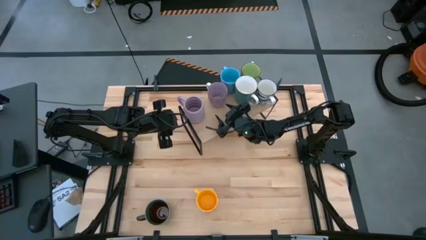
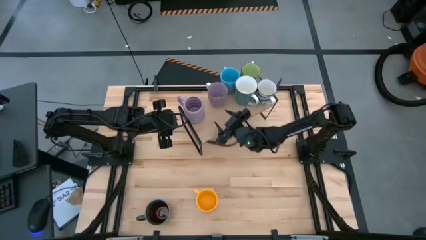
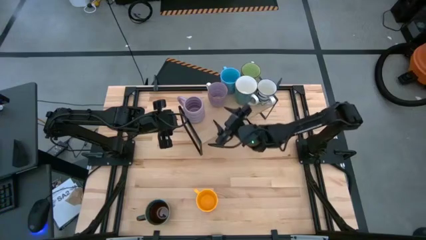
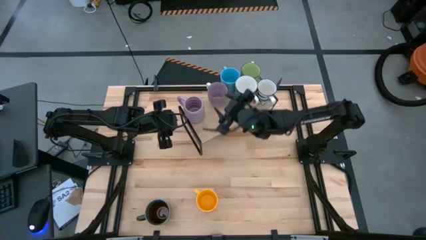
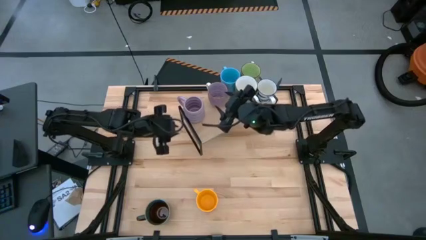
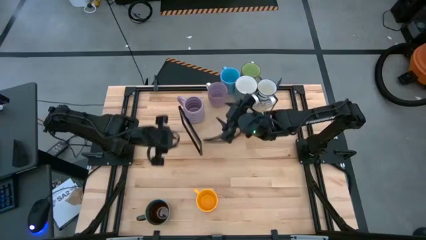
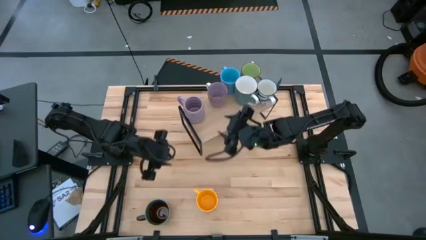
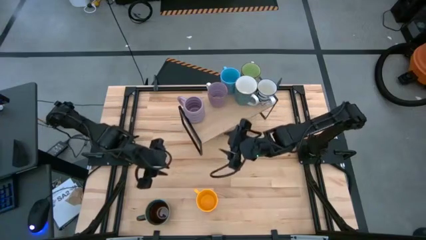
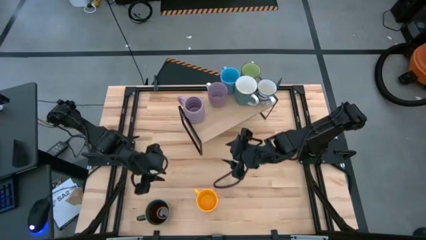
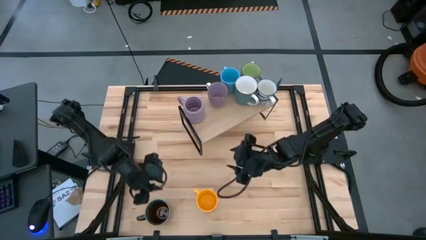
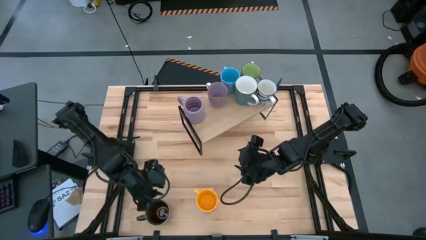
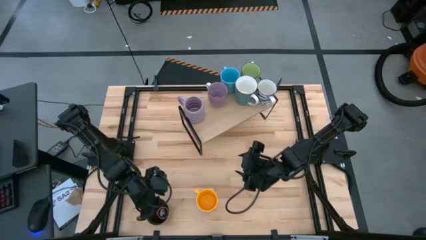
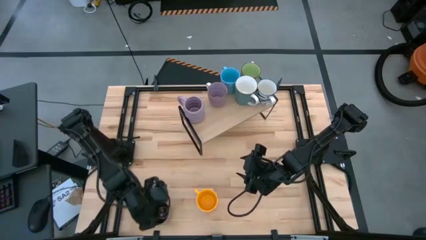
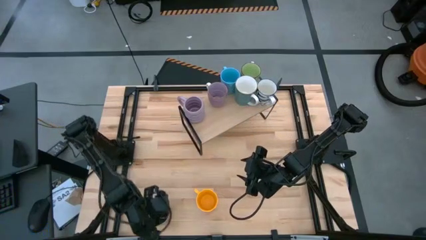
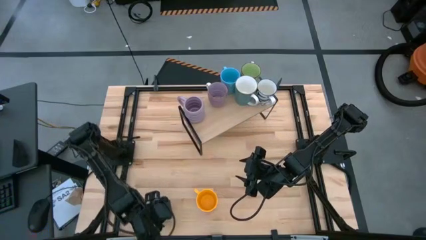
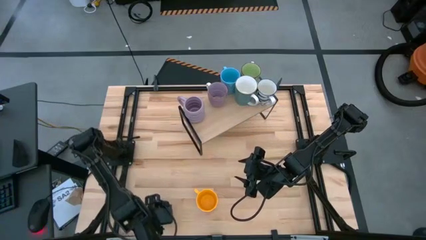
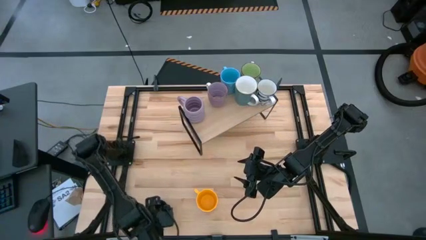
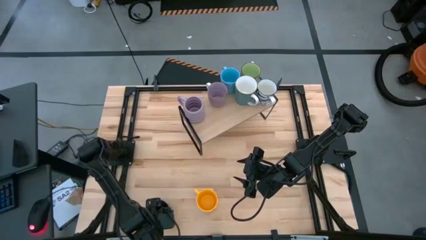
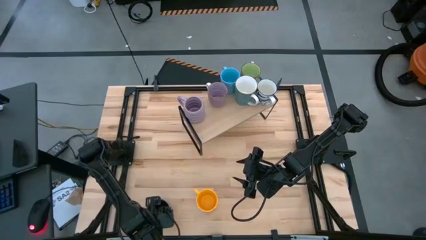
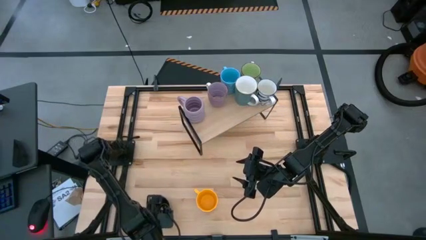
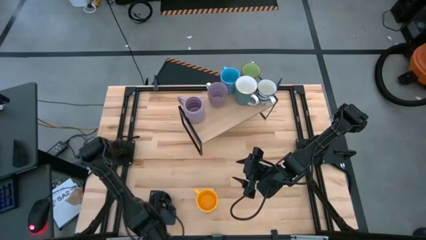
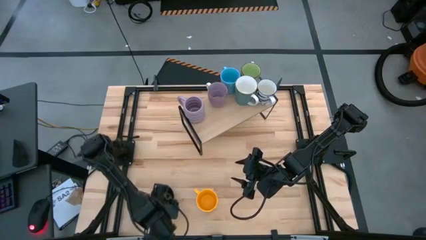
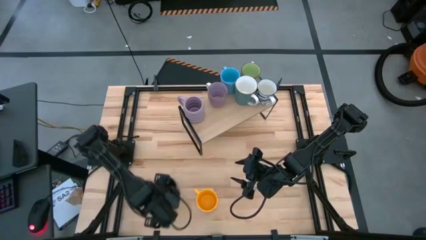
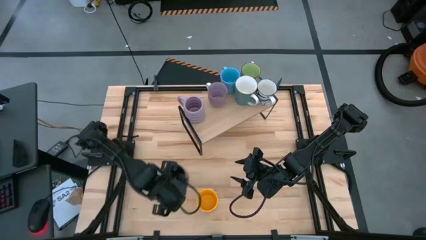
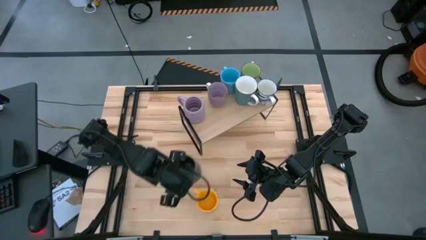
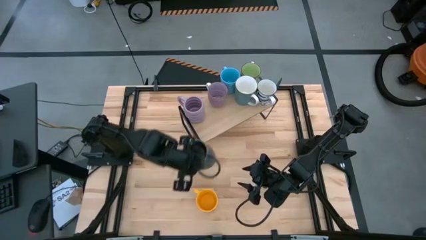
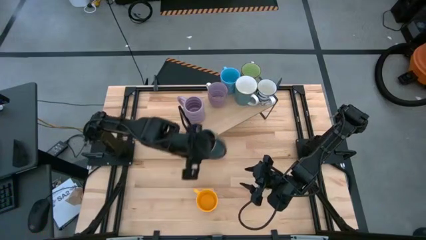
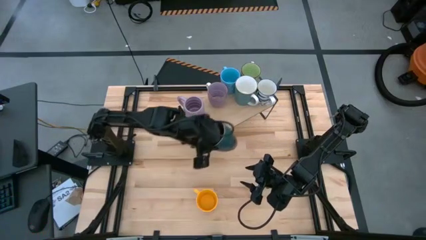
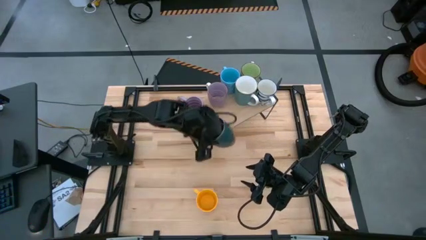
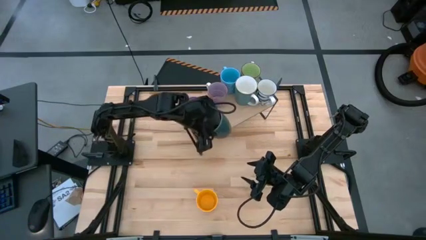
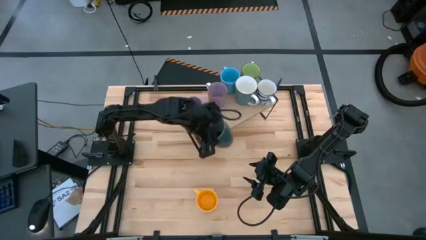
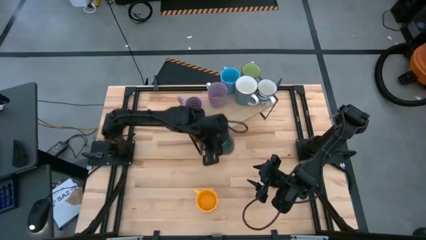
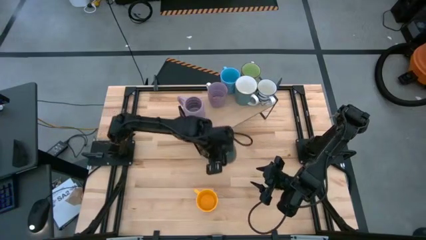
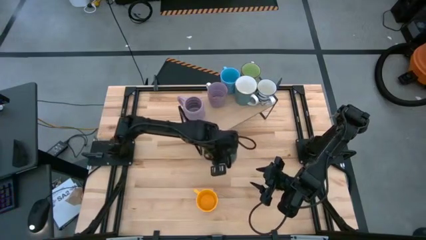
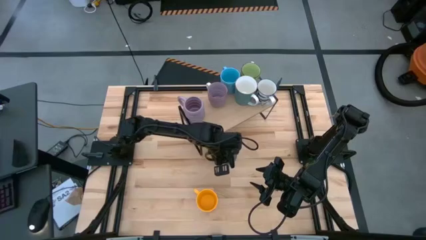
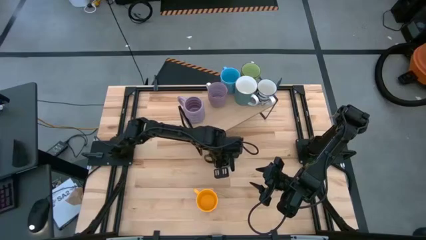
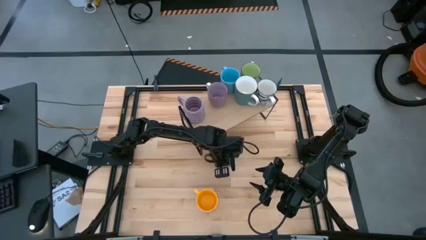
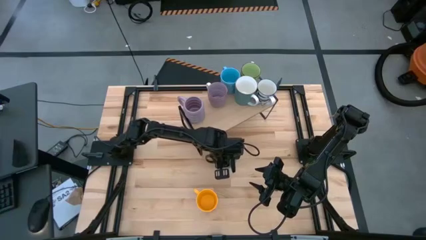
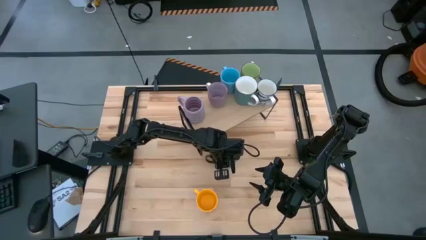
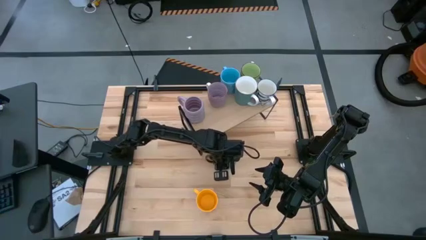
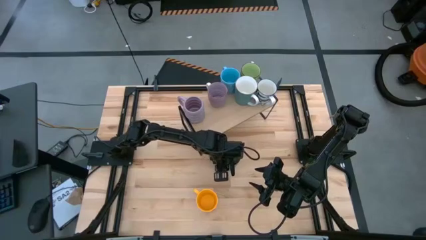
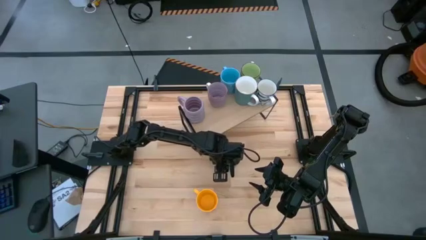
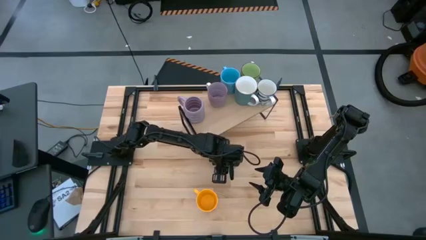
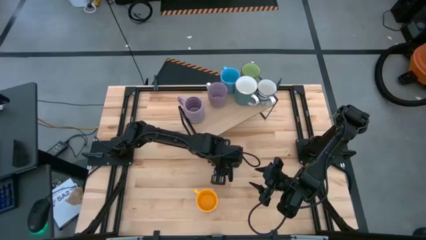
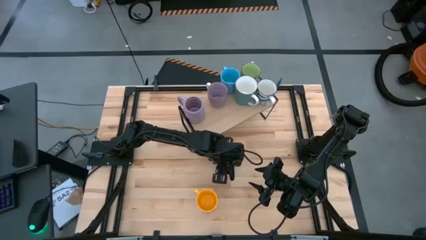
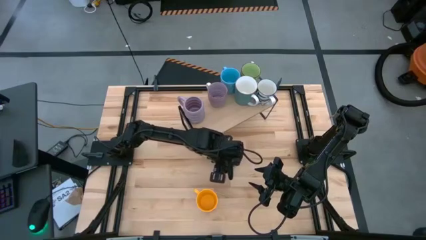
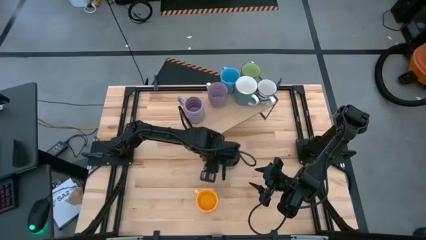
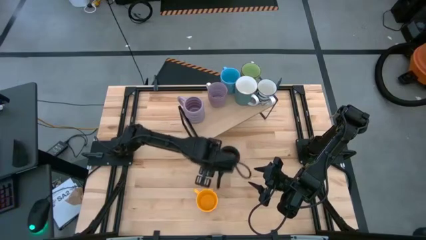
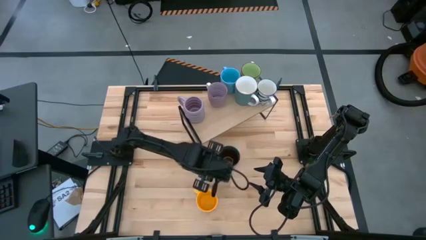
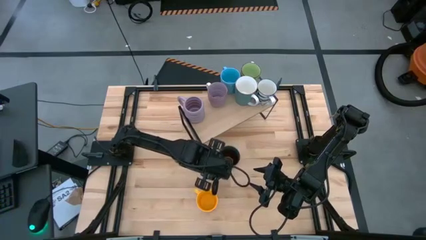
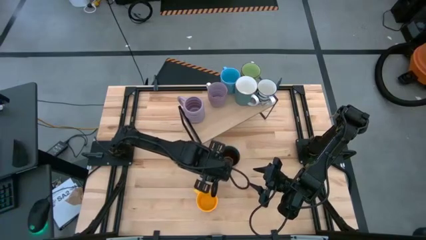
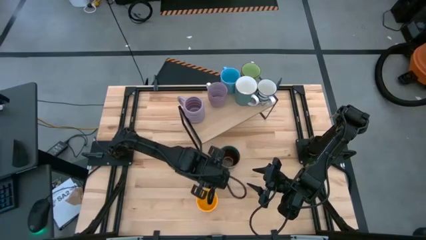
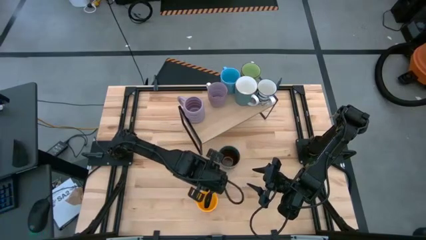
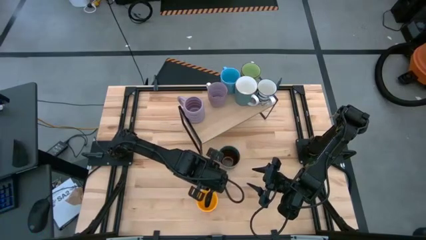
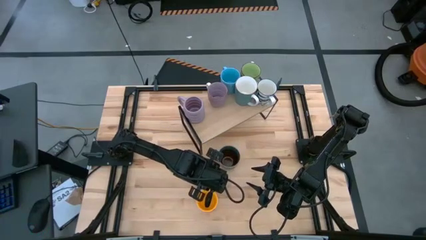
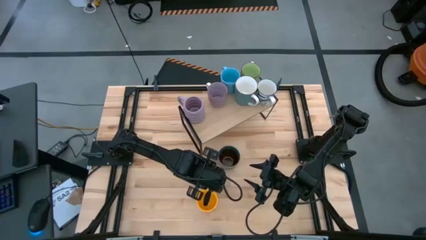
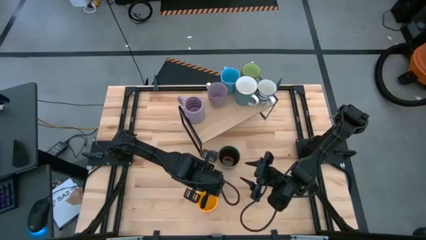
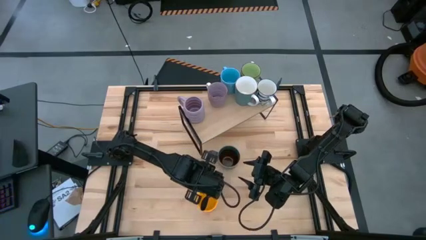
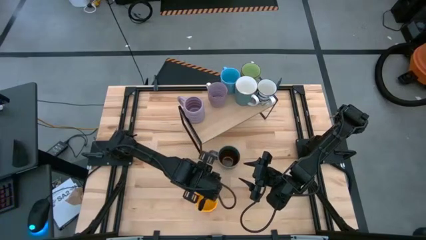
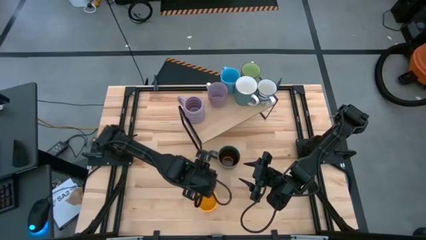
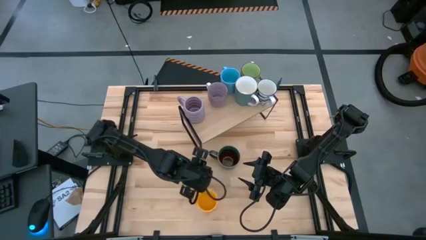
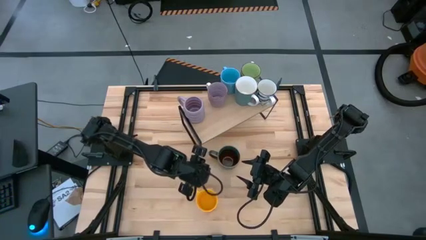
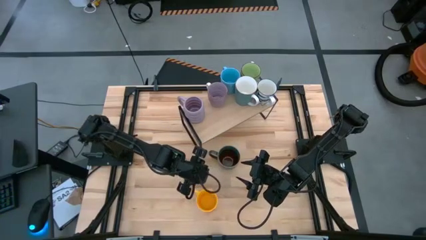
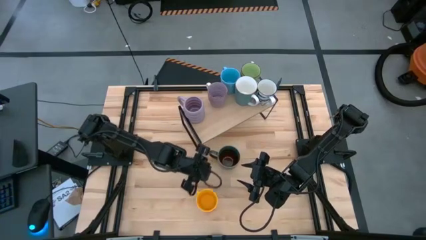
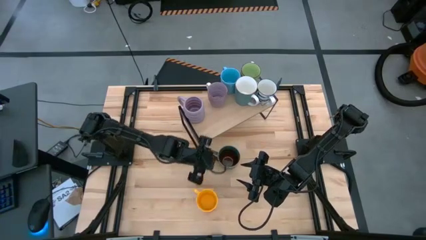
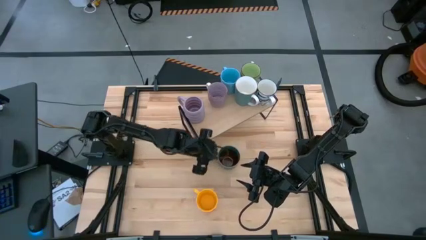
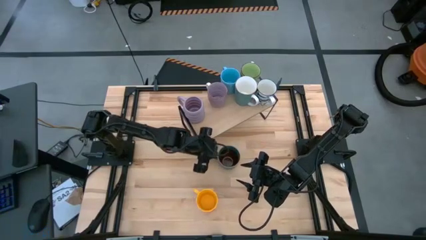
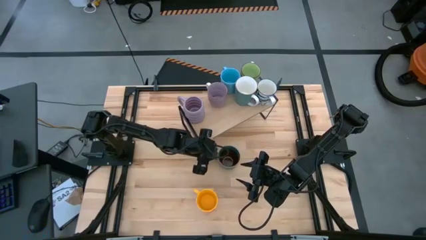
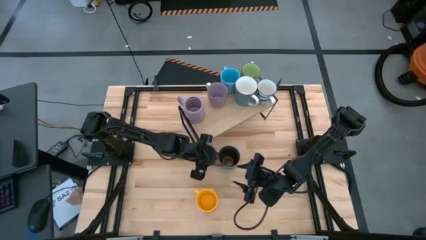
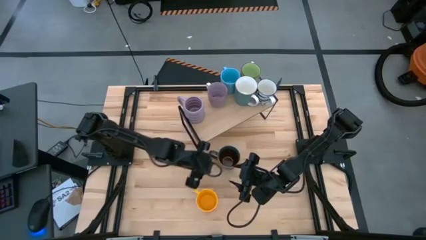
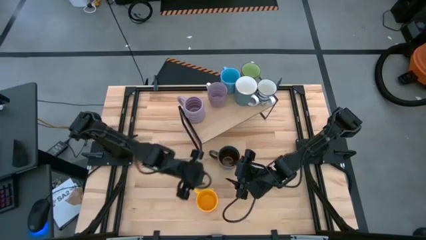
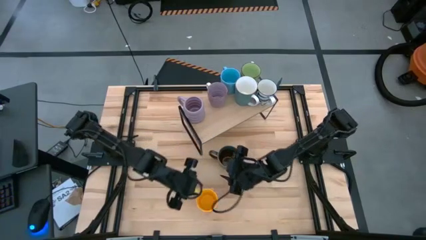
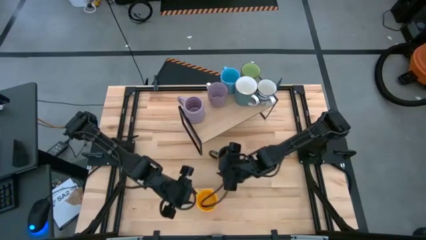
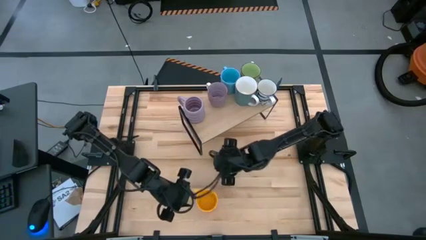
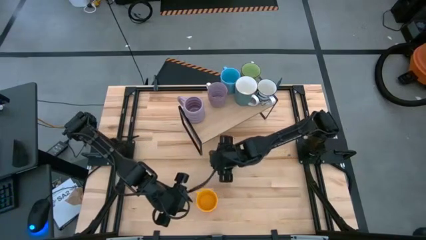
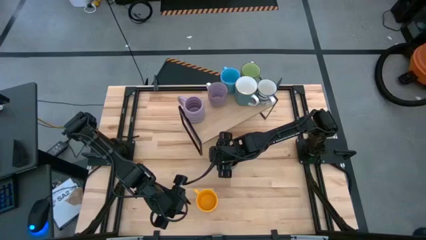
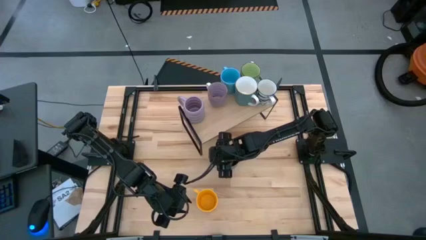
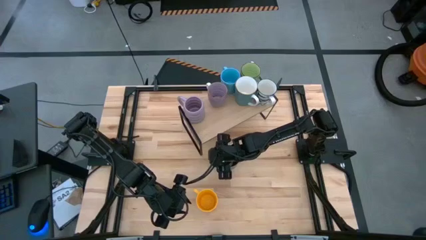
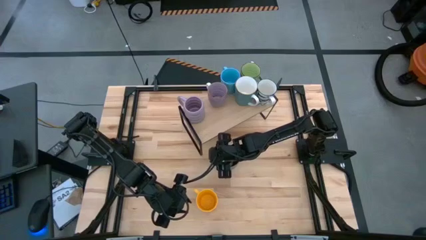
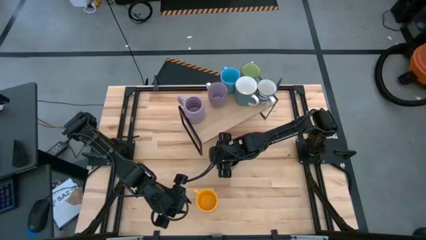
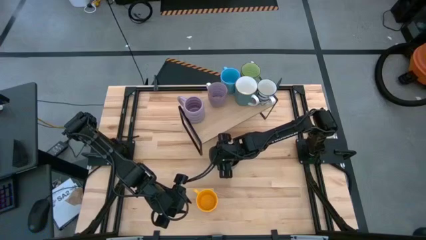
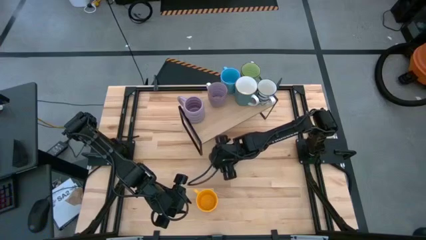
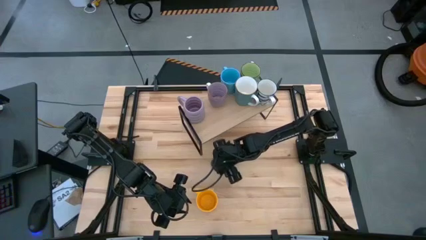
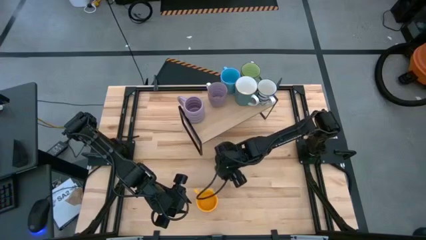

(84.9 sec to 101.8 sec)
Task: Place coffee mugs
Put the dark green mug on the shelf

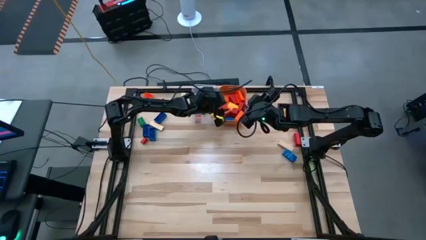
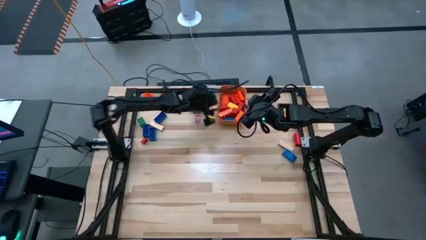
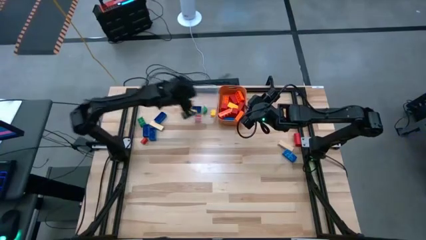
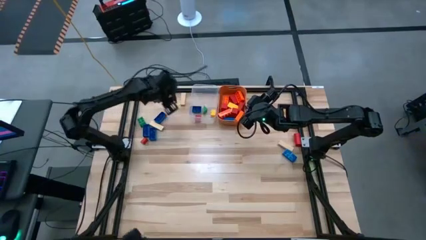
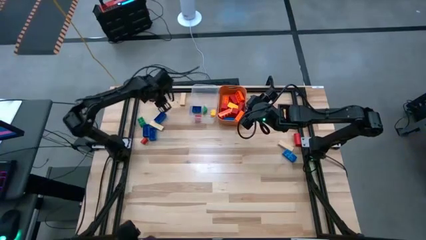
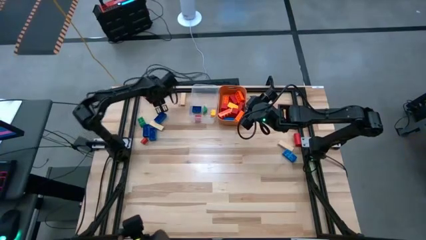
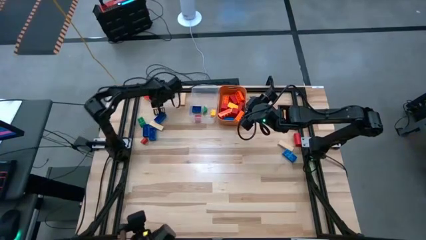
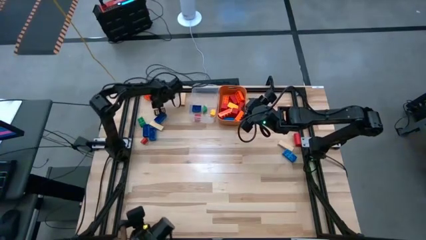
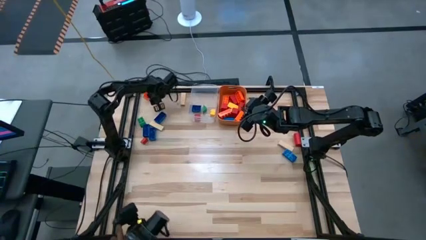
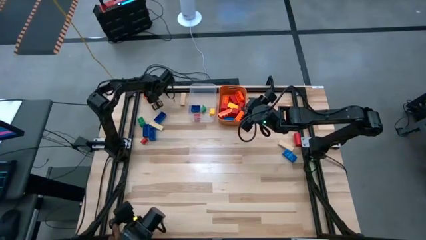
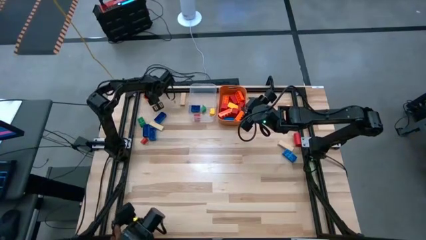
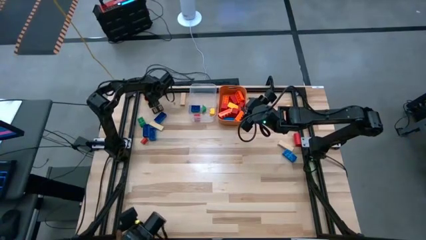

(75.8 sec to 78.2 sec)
Task: Sort blocks by size
Put the orange rounded square game piece into the orange bin
